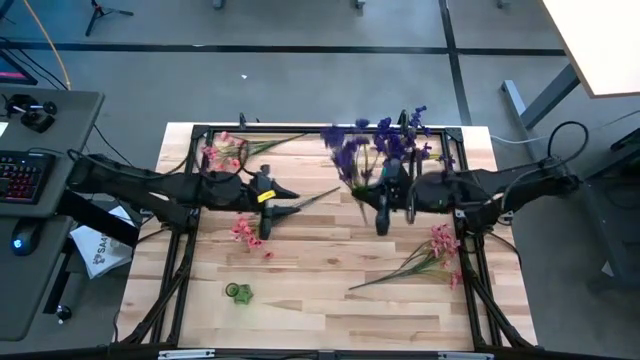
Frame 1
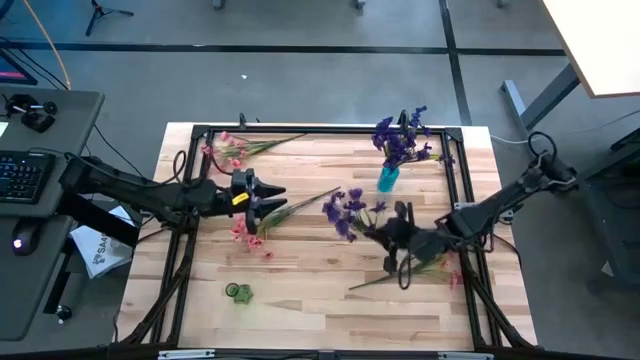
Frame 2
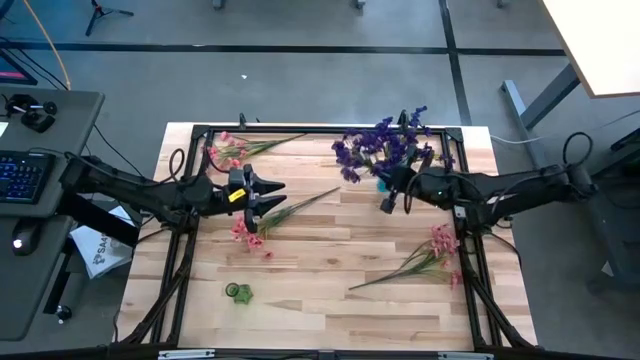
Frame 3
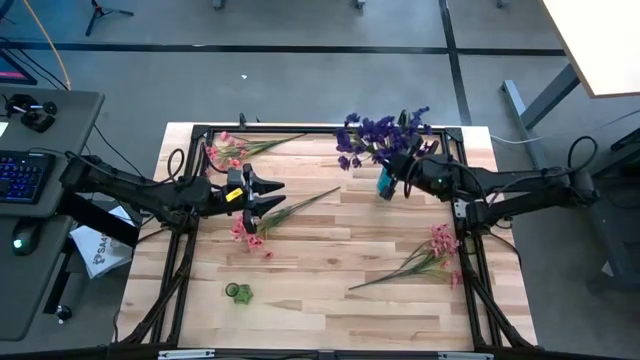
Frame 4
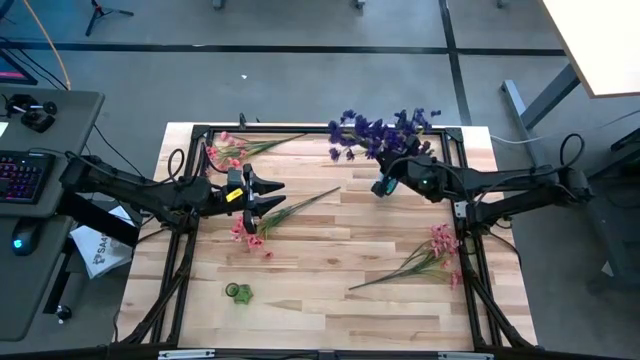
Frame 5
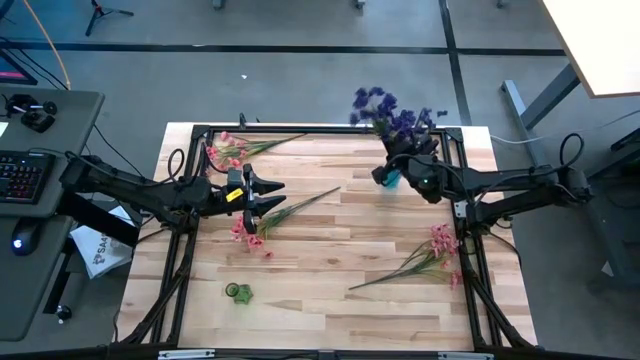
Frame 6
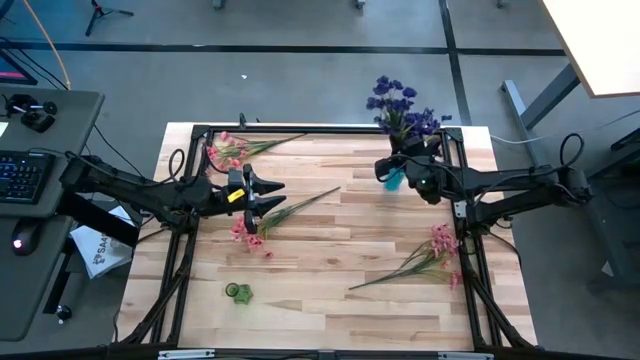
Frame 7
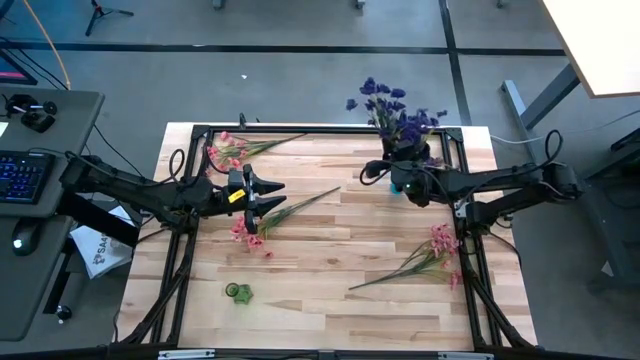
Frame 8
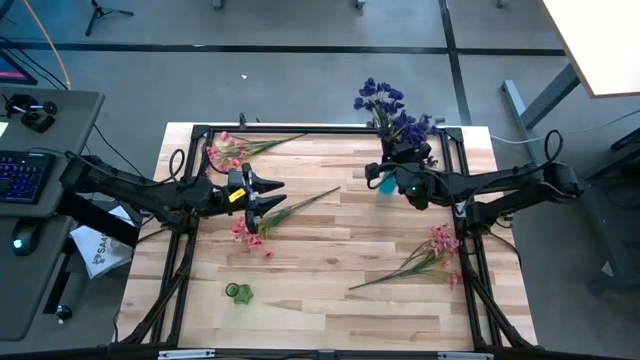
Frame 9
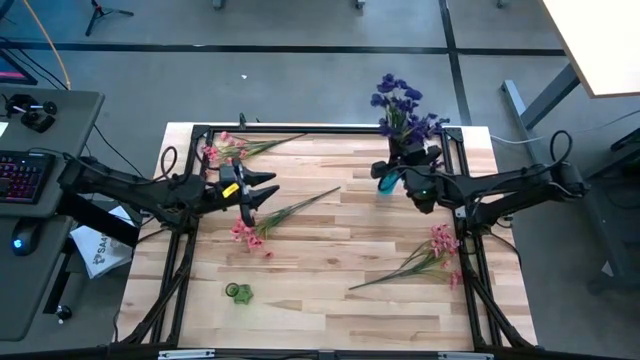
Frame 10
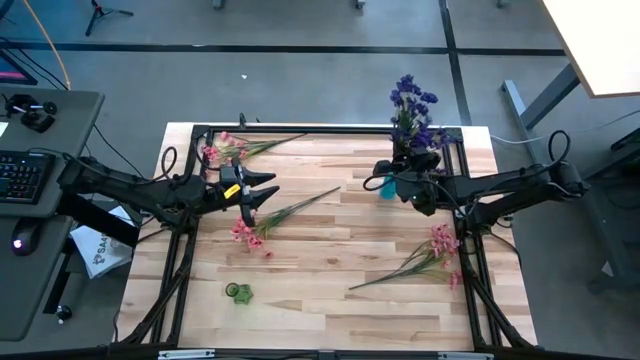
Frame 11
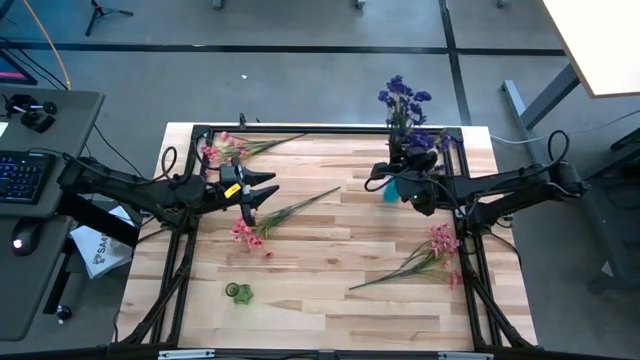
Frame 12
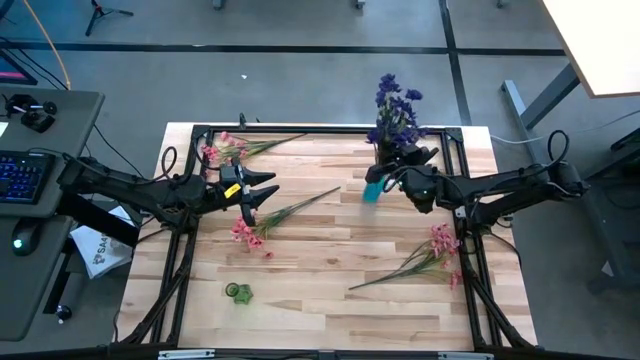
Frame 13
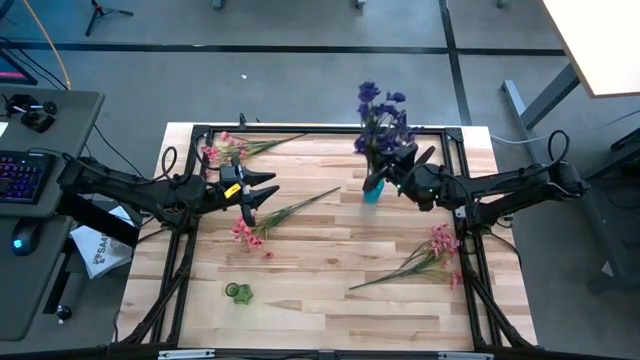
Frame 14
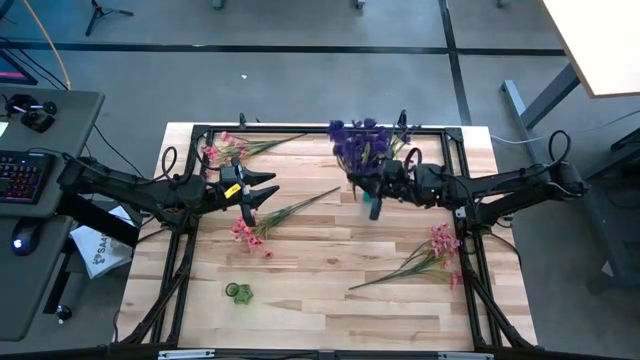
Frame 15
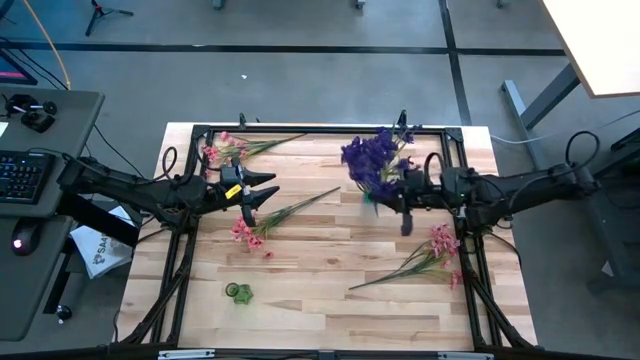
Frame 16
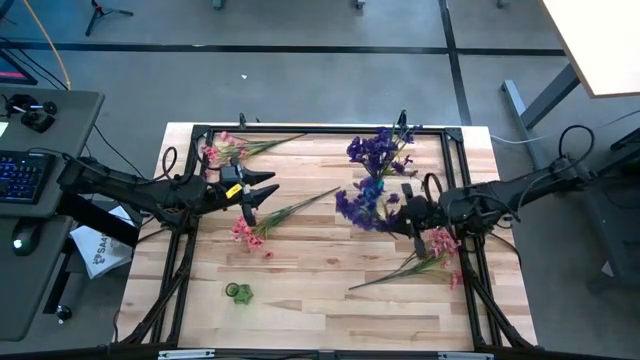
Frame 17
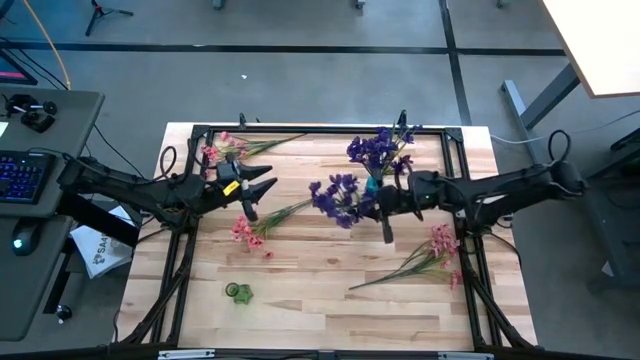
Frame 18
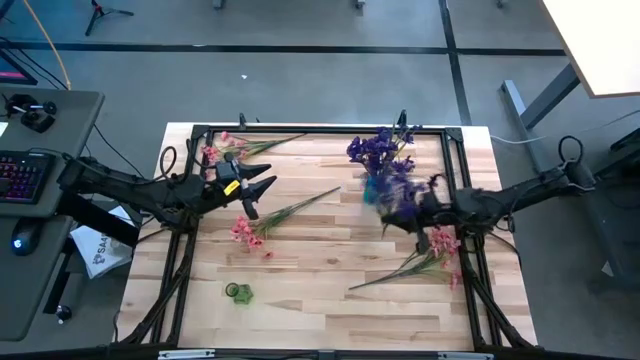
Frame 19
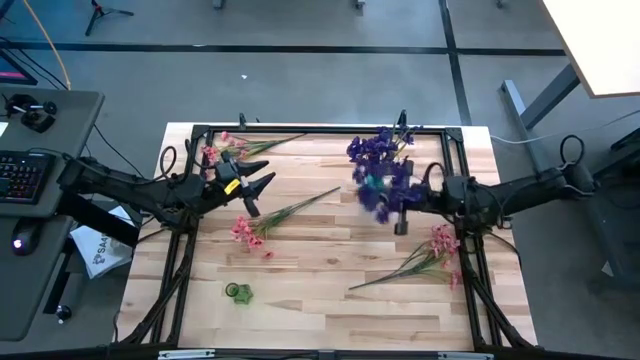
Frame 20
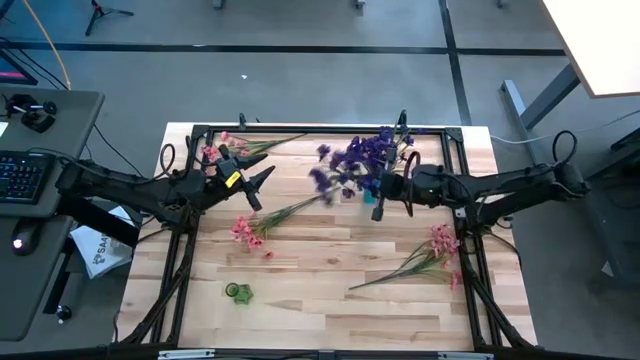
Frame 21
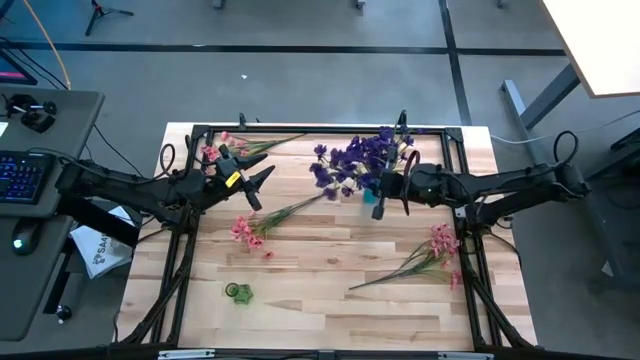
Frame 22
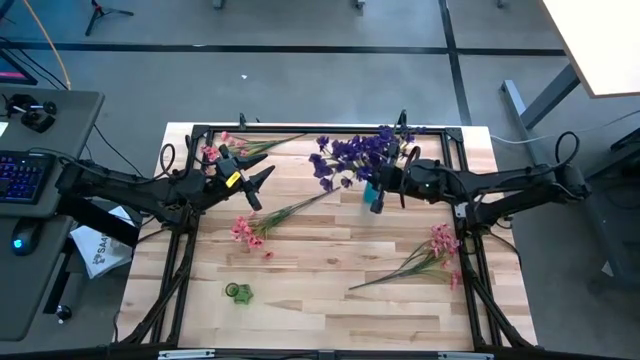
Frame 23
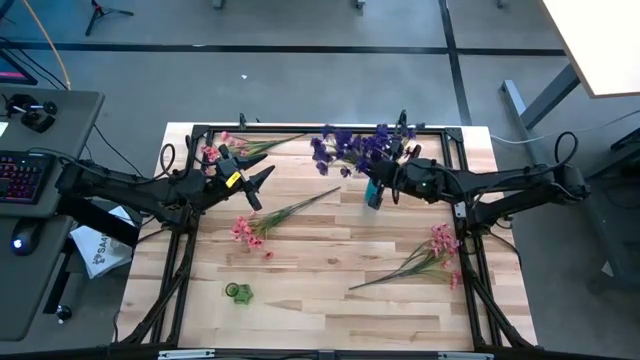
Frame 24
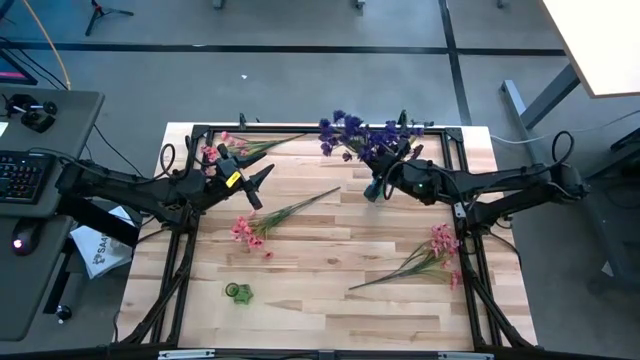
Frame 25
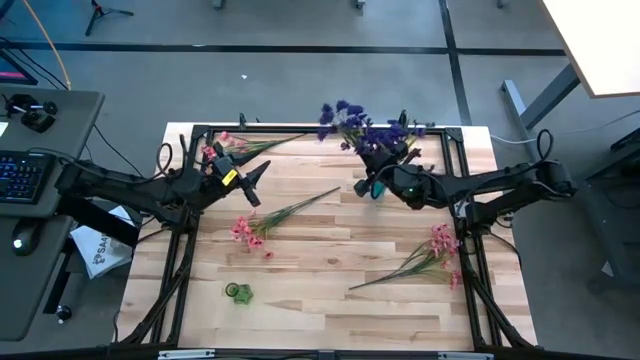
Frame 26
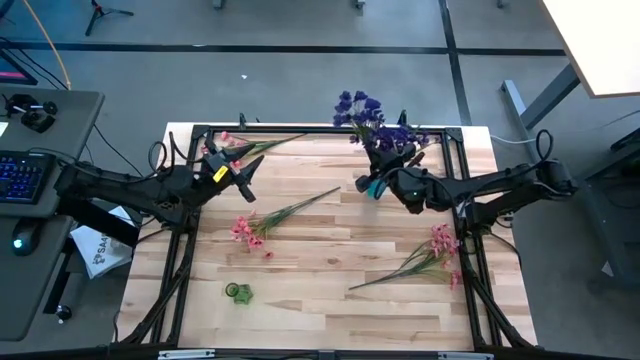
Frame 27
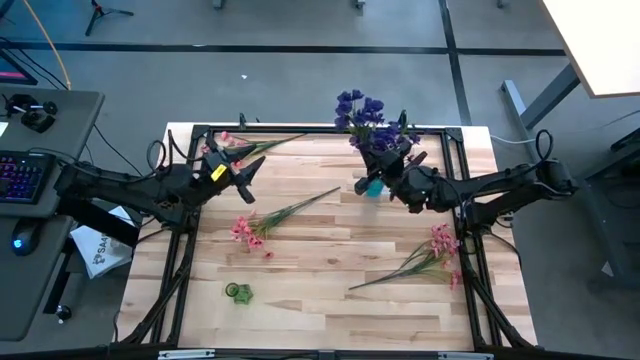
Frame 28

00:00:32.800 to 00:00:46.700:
Task: Sort flowers into vase by color
Put the violet flowers into the blue vase
